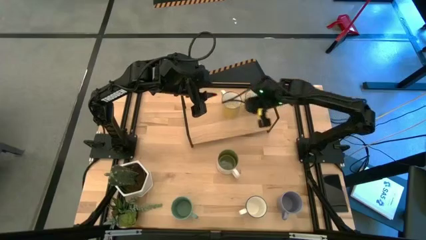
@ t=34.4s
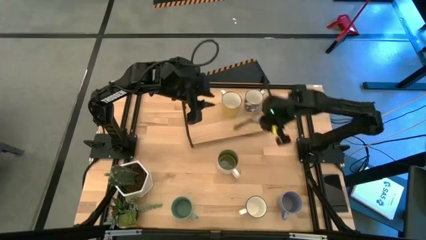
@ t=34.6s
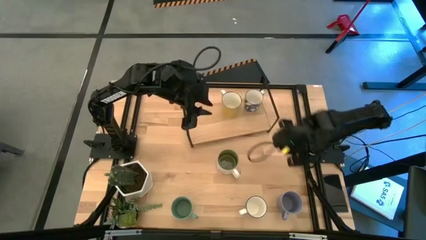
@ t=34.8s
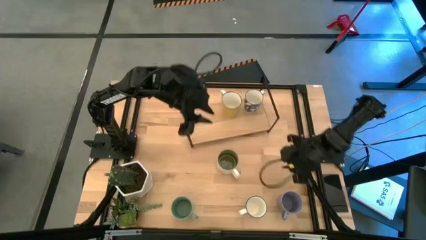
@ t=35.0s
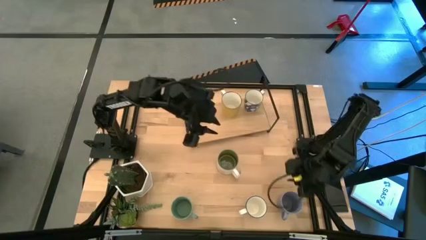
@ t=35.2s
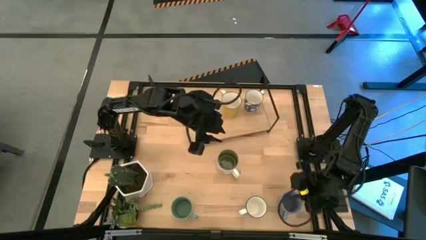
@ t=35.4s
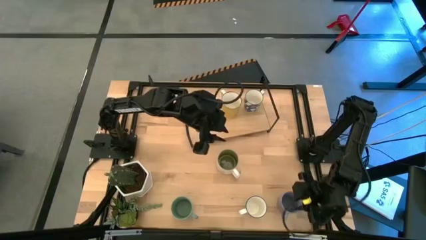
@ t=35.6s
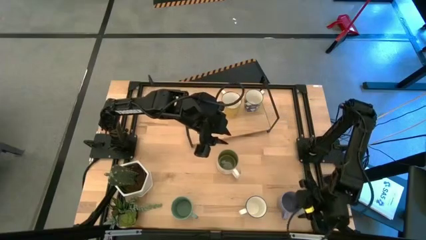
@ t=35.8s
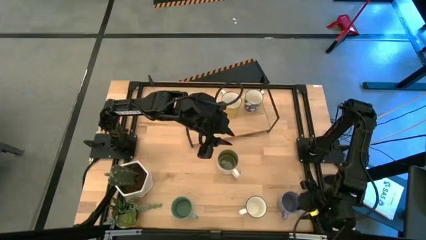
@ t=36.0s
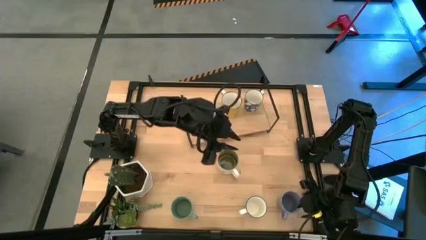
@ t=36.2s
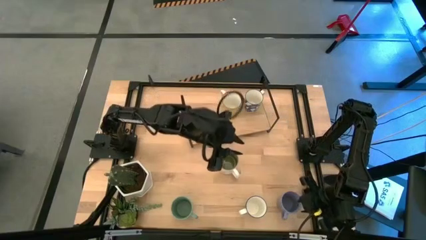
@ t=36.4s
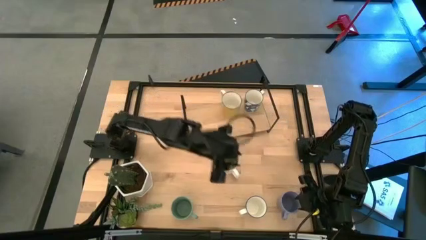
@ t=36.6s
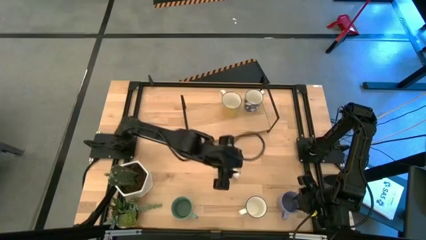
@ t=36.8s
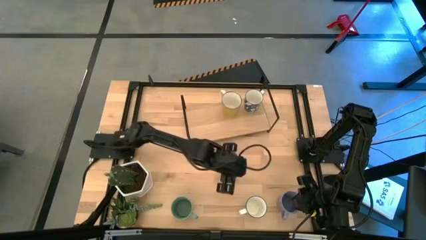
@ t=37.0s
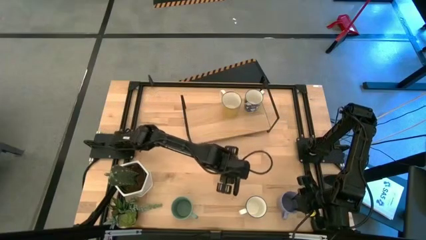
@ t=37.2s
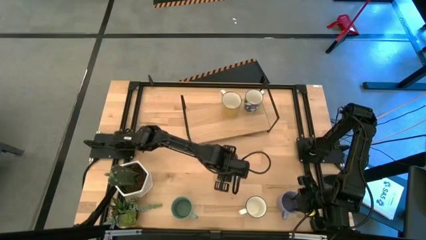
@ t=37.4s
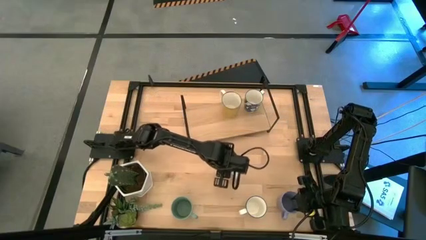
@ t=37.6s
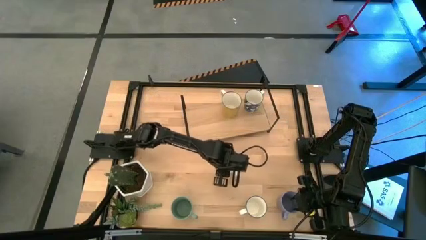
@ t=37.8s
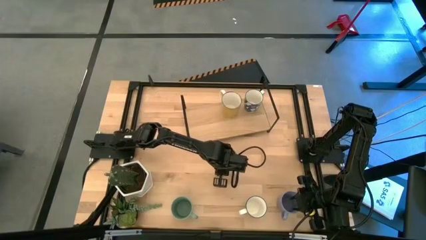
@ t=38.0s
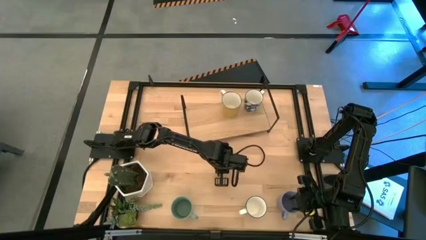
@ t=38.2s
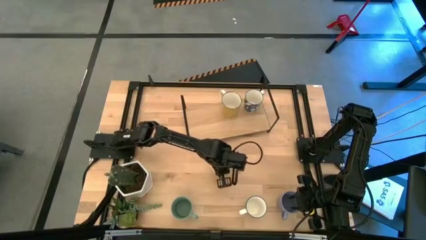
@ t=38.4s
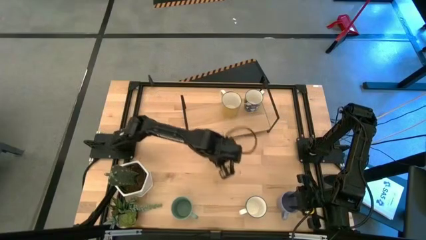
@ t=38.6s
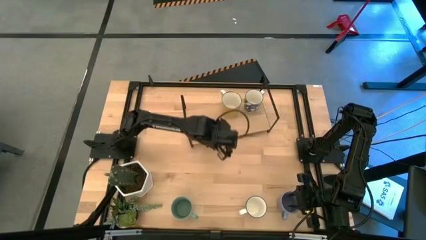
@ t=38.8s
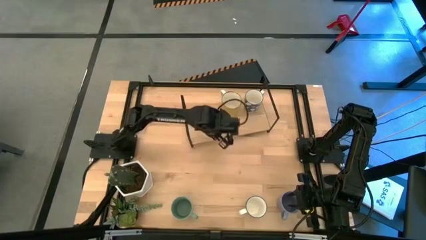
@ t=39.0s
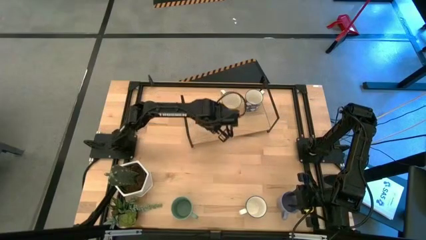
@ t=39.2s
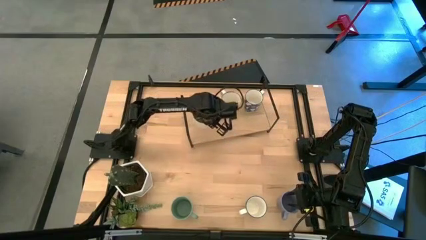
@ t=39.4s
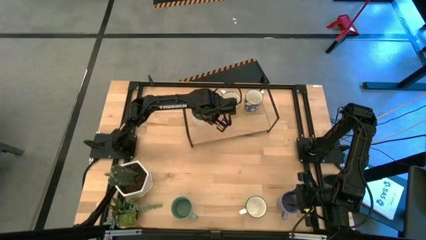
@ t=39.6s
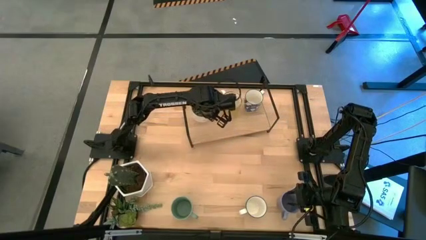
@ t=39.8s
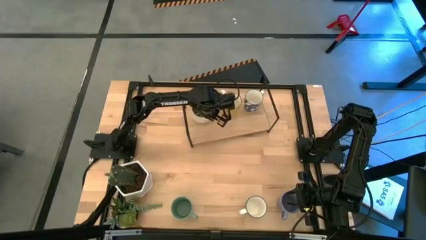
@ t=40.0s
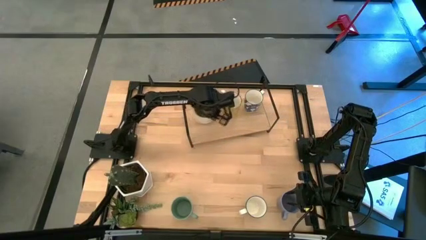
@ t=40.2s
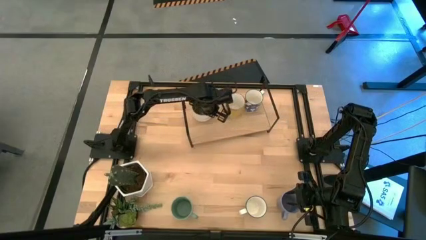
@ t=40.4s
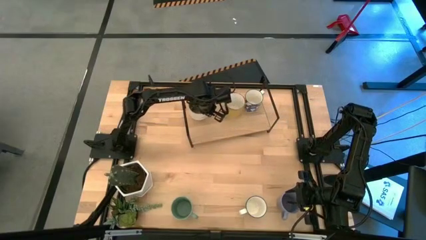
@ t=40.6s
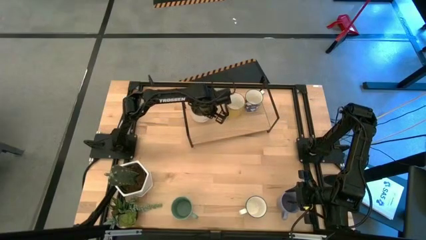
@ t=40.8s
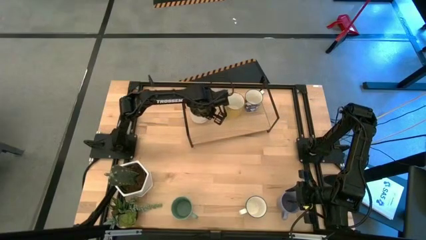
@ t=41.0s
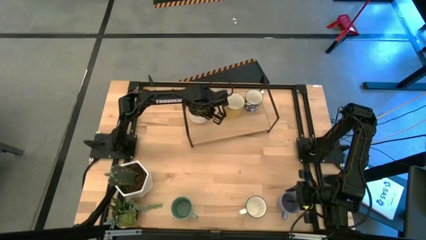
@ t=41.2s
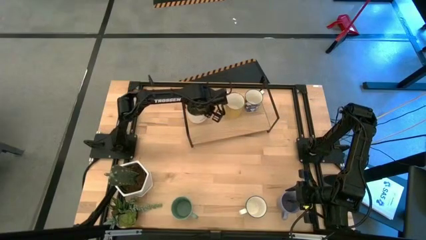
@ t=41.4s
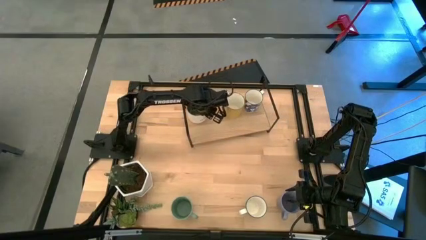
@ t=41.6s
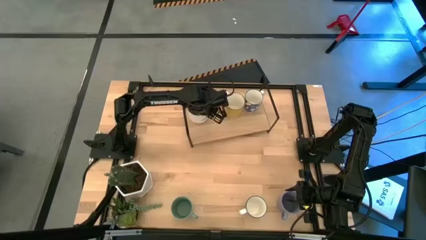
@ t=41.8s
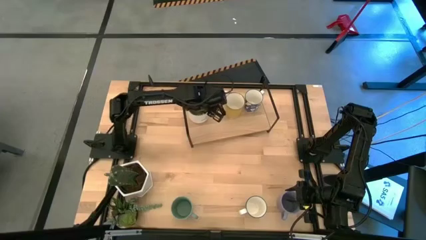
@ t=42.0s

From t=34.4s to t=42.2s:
Task: Place coffee mugs
Put the white mug on the shelf

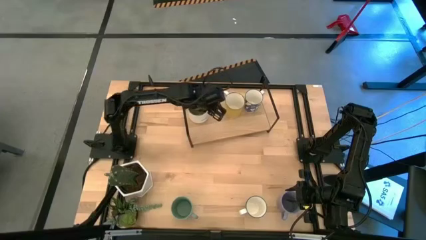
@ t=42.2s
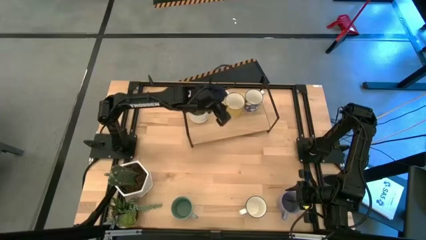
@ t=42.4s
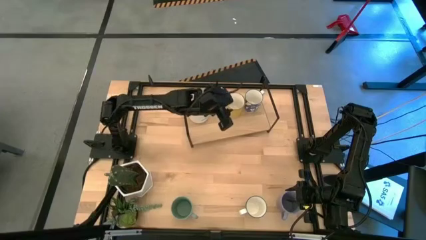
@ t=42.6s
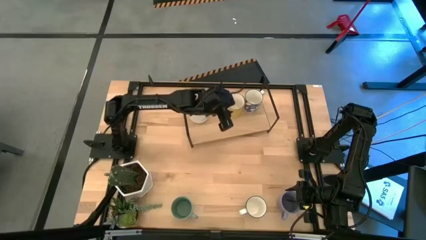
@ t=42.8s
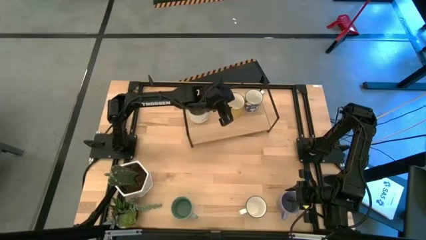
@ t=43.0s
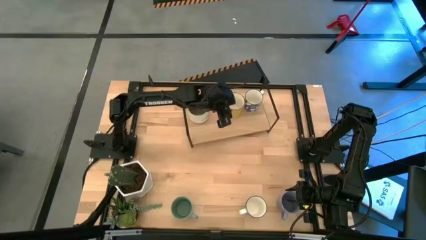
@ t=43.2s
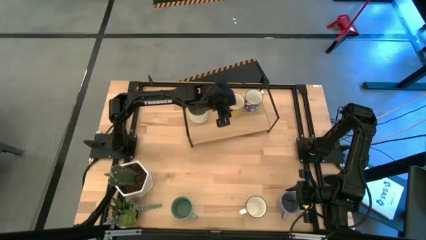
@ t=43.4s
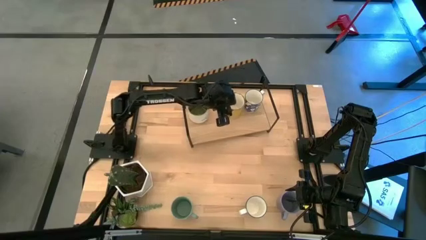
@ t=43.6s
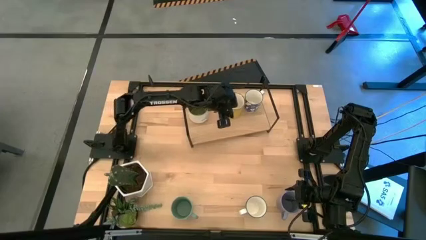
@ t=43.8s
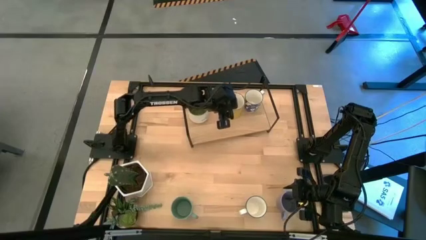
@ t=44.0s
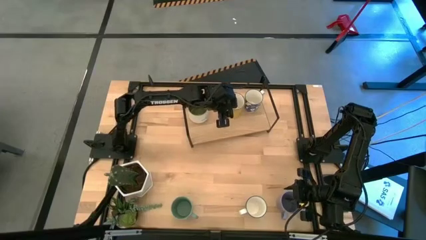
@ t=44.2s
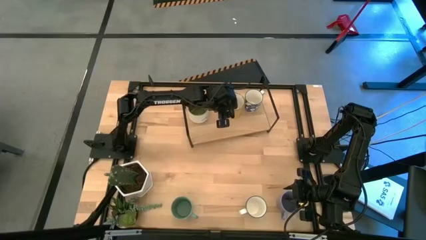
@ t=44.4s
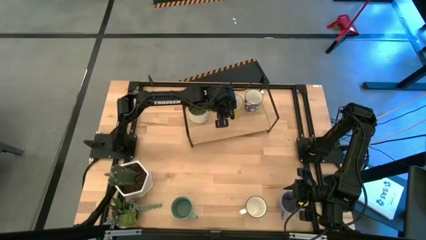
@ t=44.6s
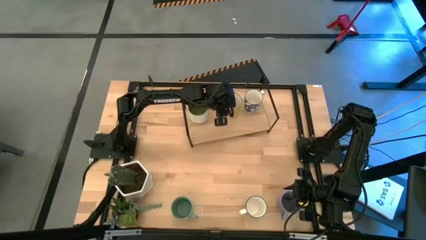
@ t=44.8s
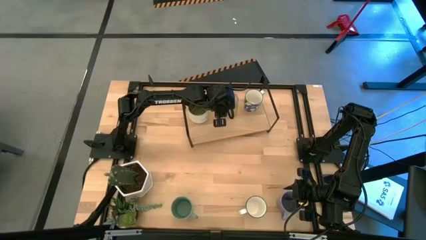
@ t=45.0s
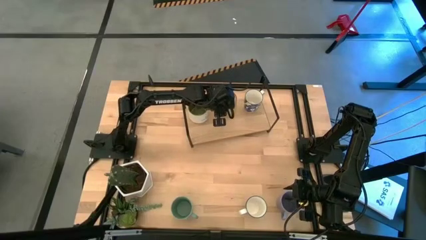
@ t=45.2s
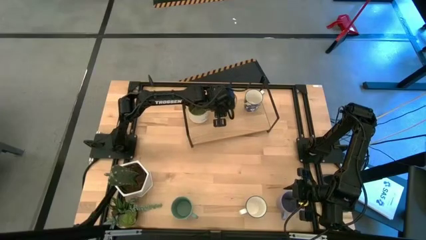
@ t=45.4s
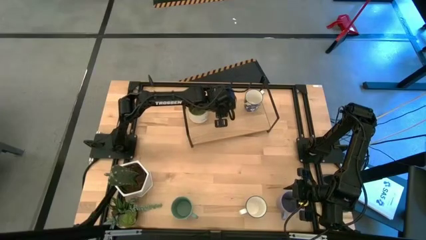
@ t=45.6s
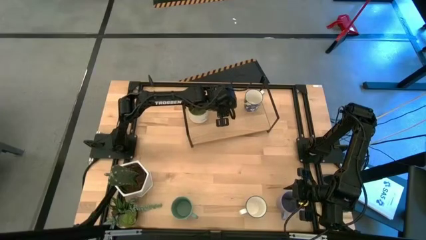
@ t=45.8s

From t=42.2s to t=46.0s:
Adjust the yellow mug on the shelf
